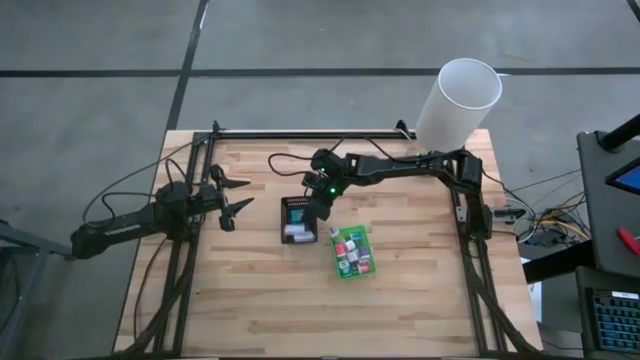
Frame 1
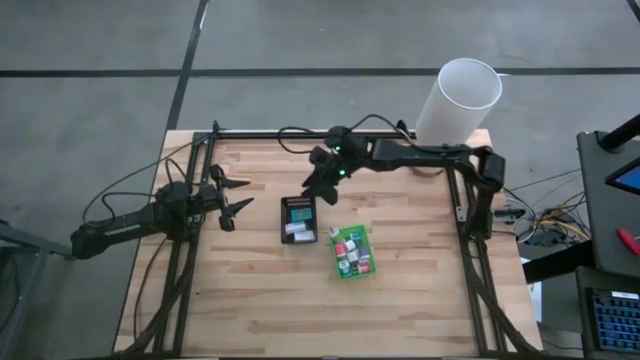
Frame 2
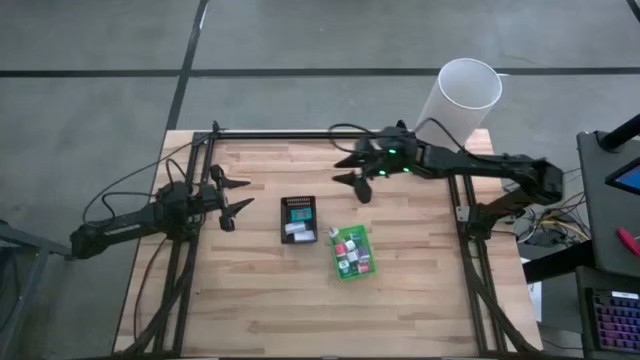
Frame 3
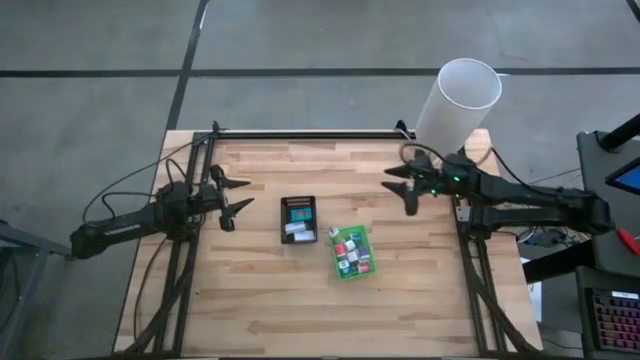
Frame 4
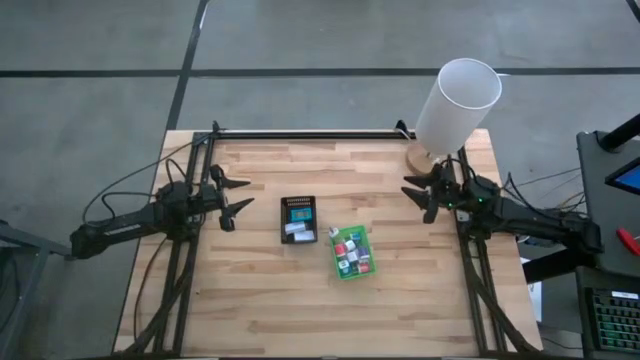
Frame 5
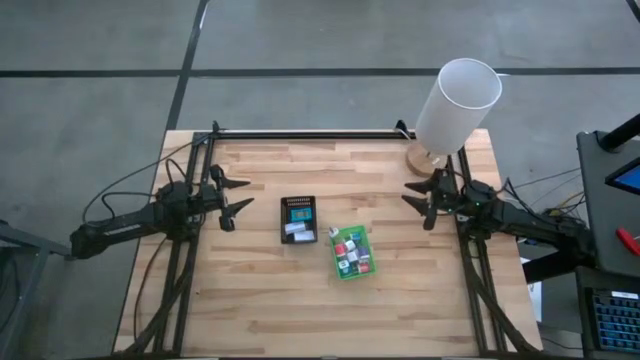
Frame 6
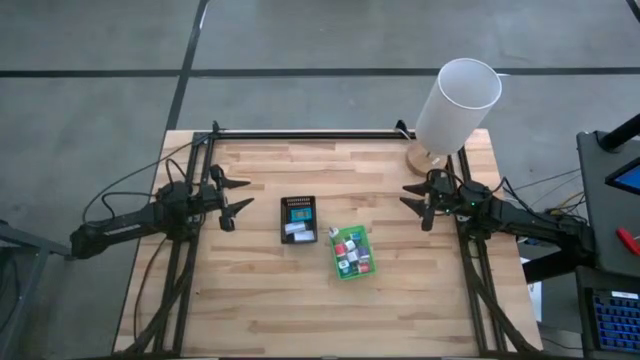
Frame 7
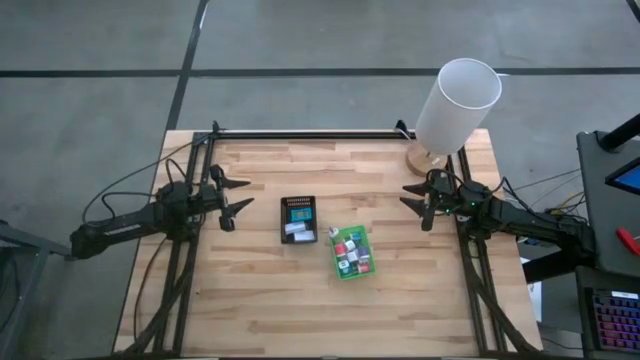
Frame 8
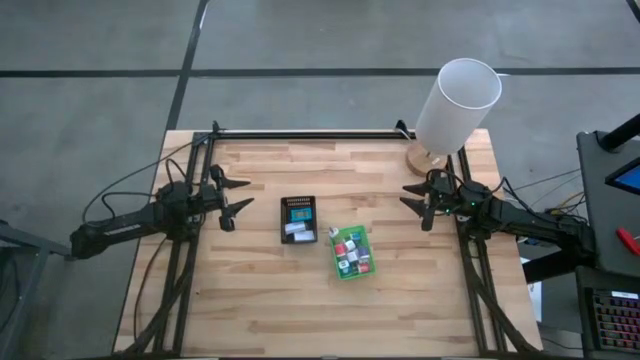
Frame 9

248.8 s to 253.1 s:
Task: Pick & Place Office items
Return to Home Position

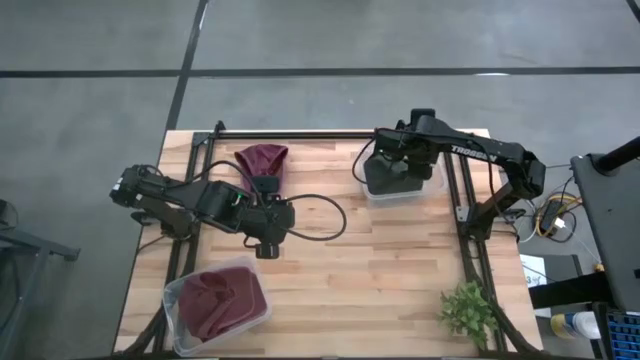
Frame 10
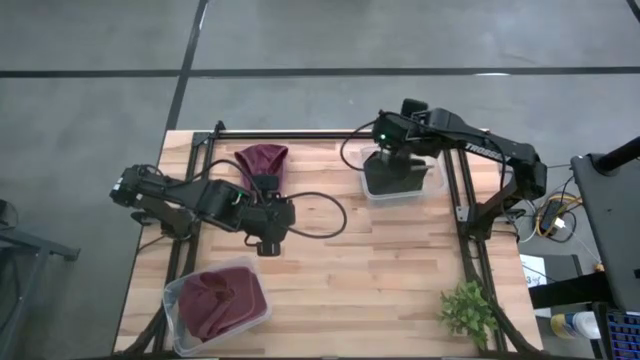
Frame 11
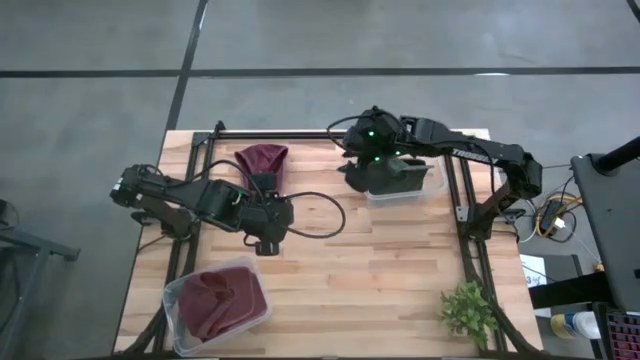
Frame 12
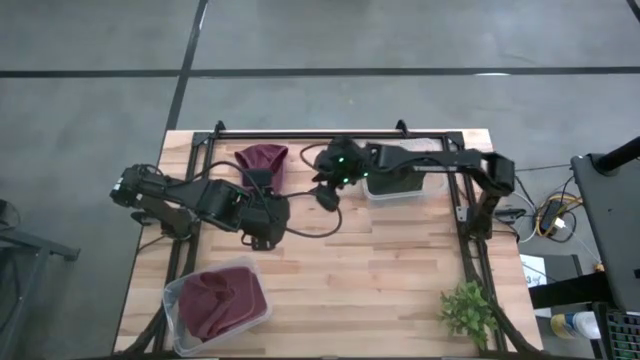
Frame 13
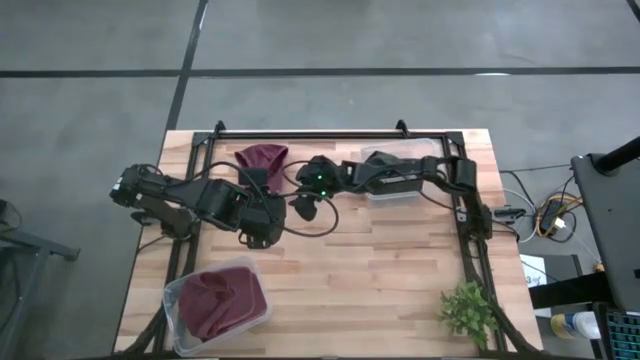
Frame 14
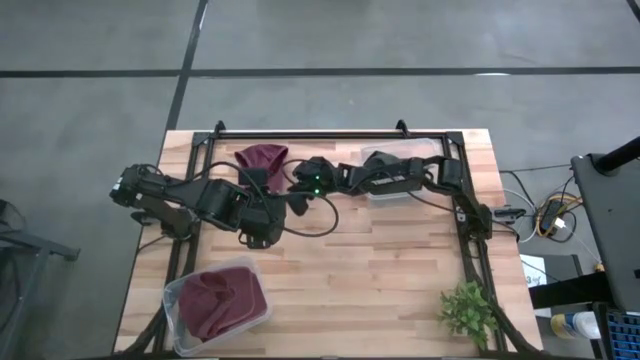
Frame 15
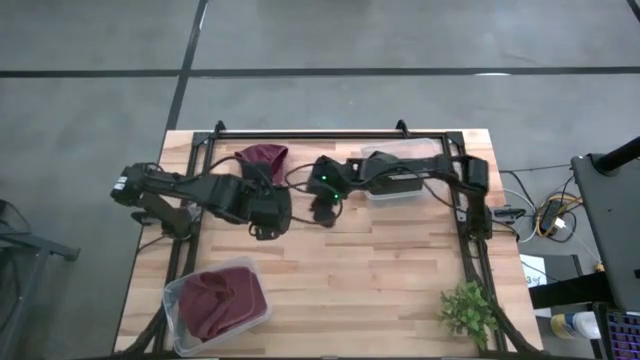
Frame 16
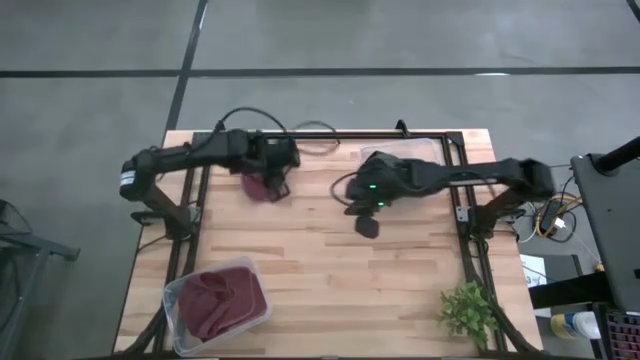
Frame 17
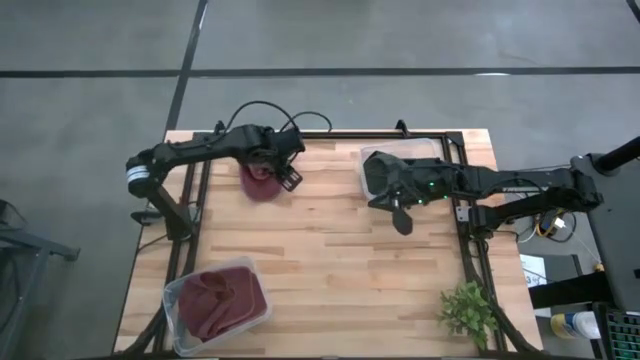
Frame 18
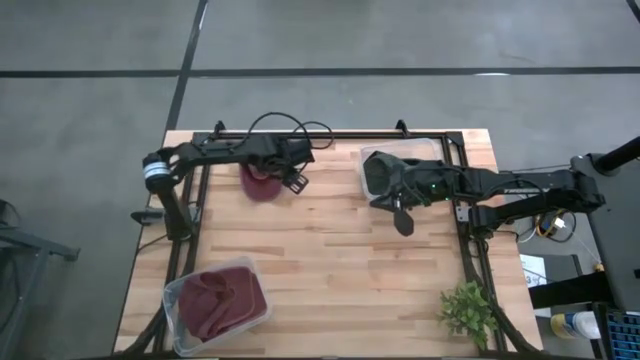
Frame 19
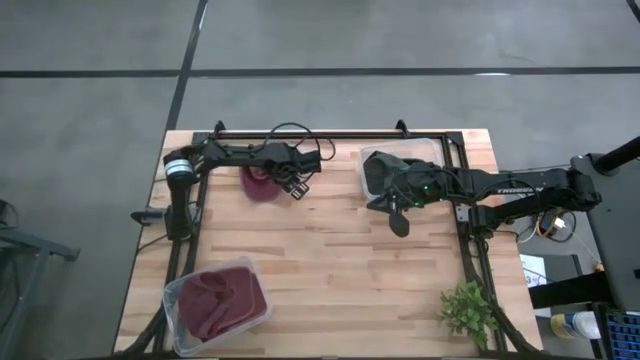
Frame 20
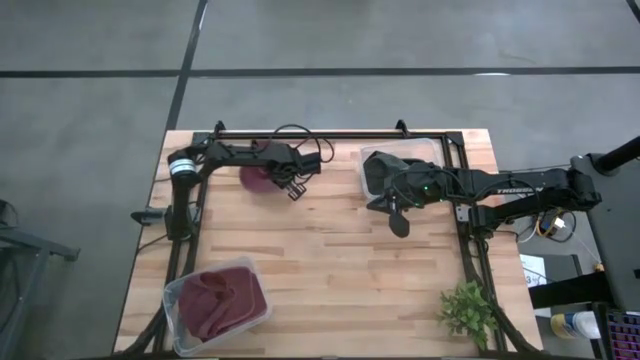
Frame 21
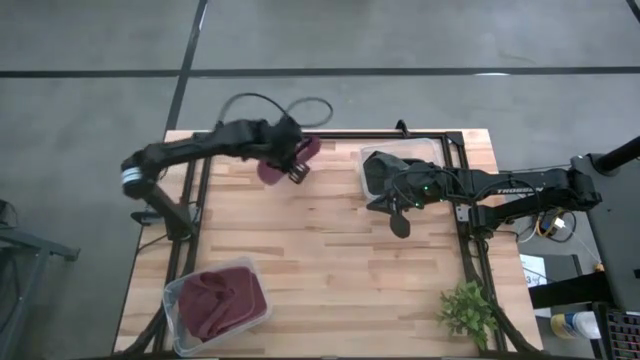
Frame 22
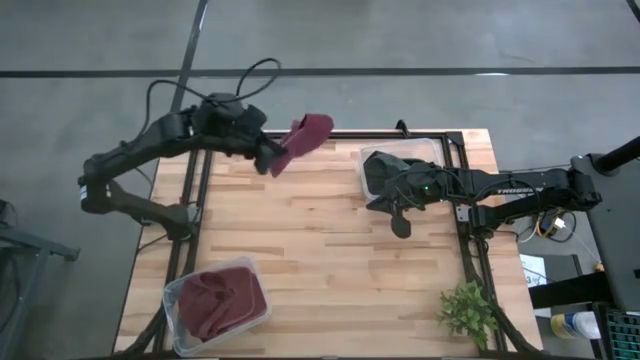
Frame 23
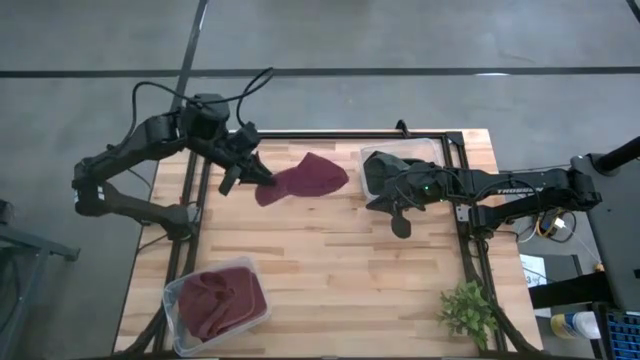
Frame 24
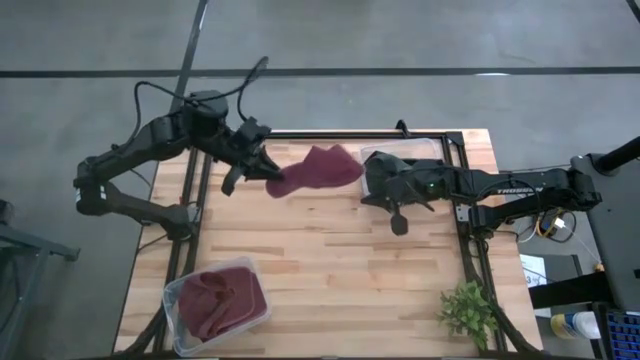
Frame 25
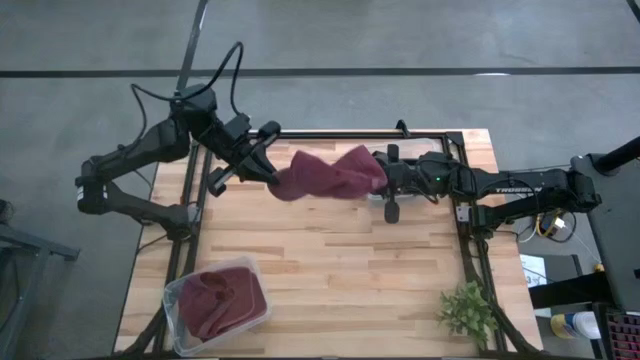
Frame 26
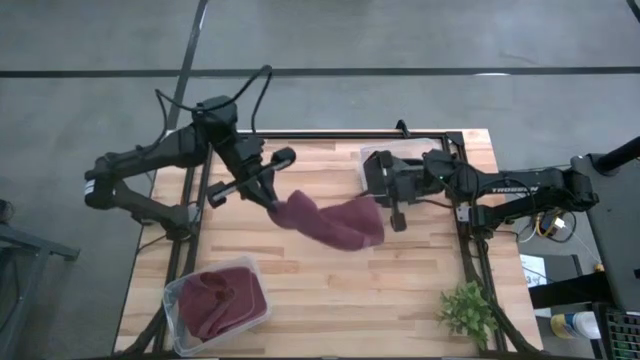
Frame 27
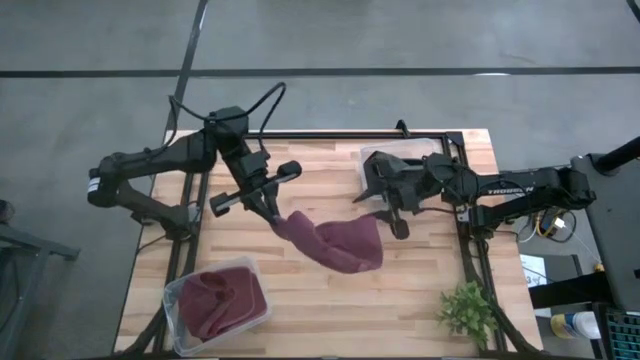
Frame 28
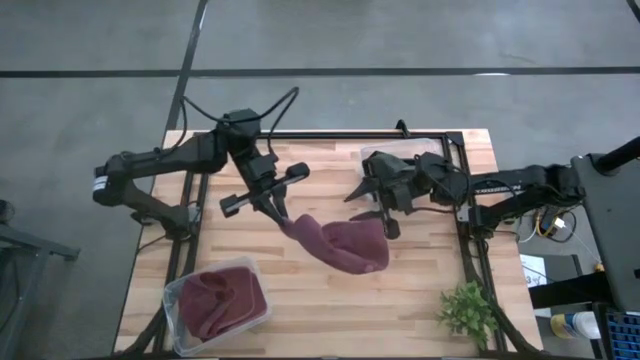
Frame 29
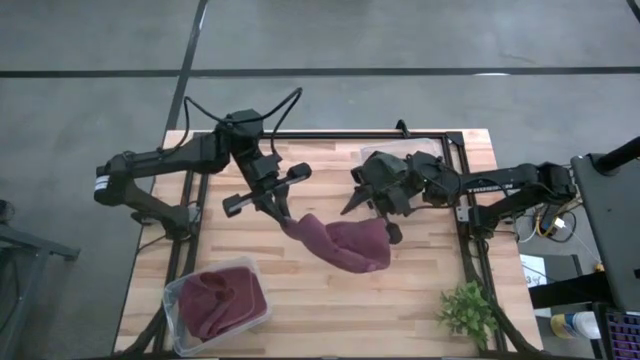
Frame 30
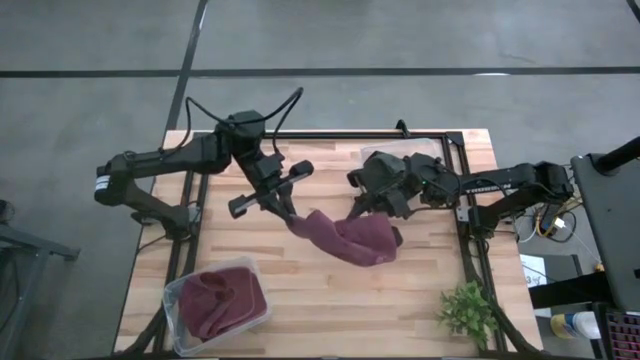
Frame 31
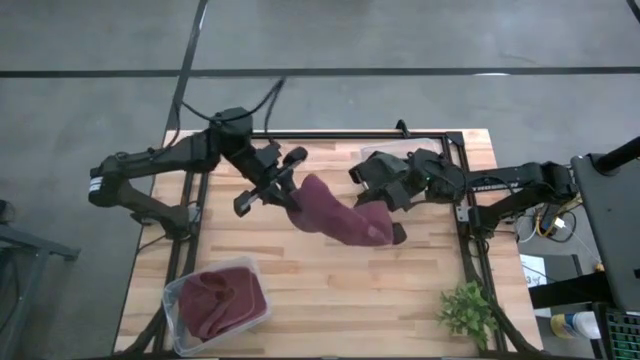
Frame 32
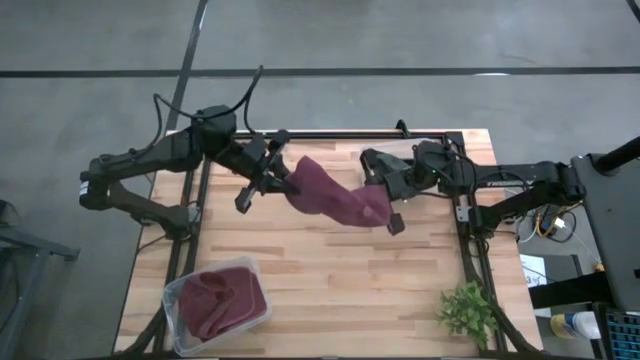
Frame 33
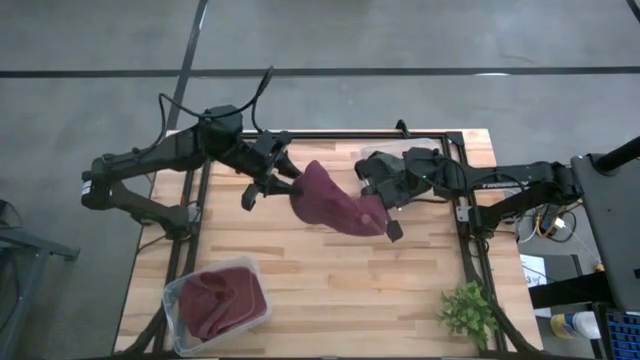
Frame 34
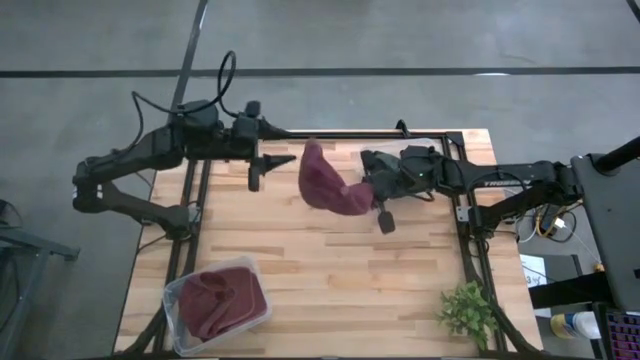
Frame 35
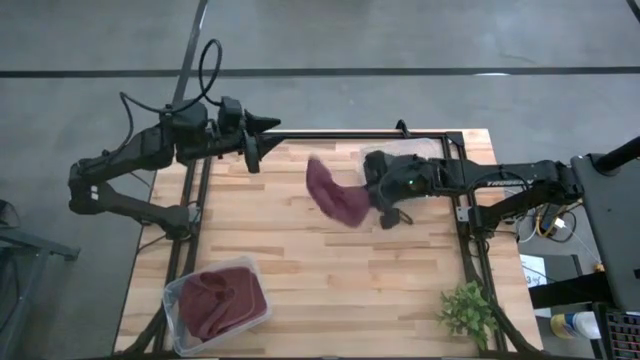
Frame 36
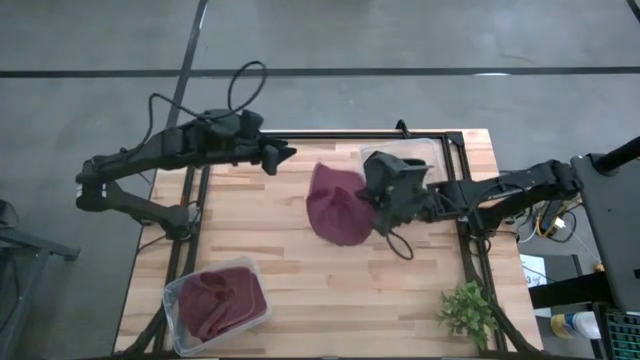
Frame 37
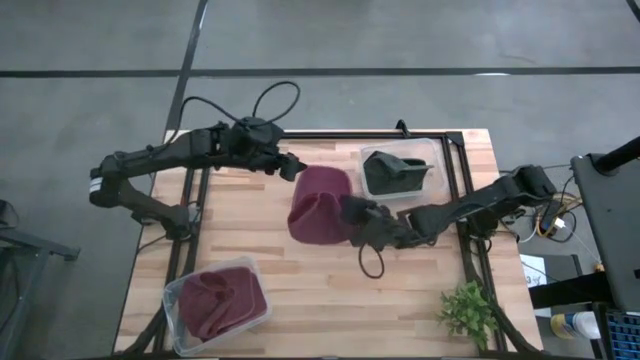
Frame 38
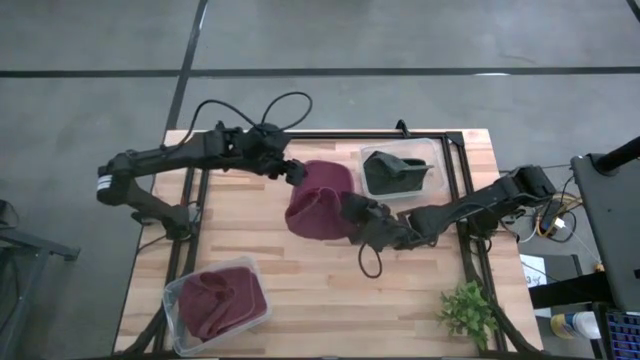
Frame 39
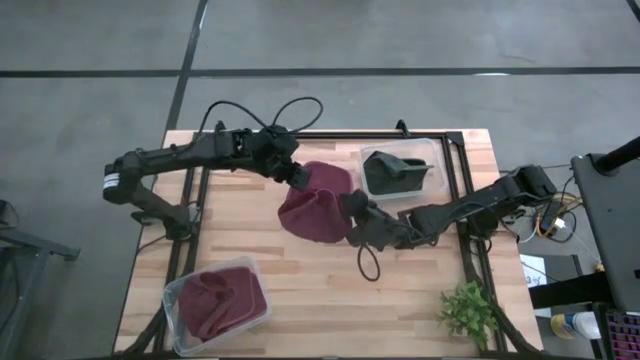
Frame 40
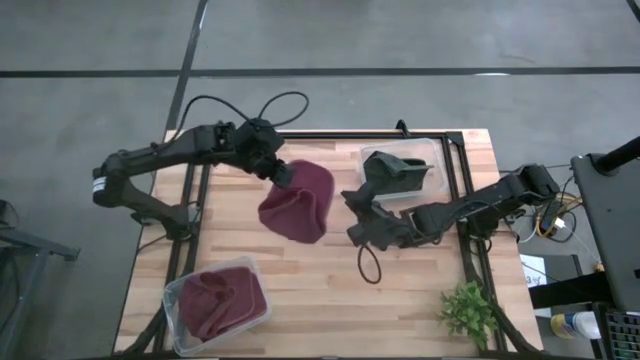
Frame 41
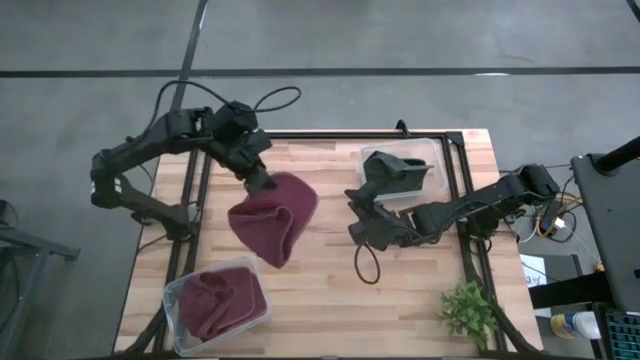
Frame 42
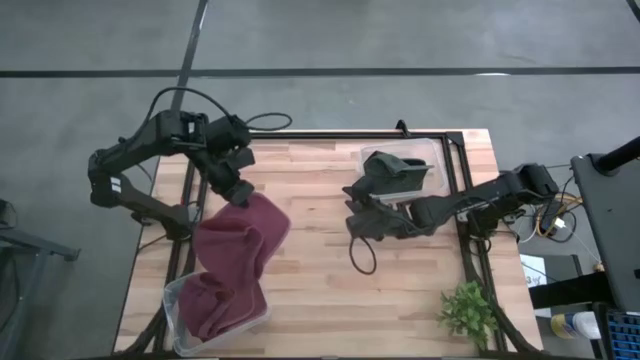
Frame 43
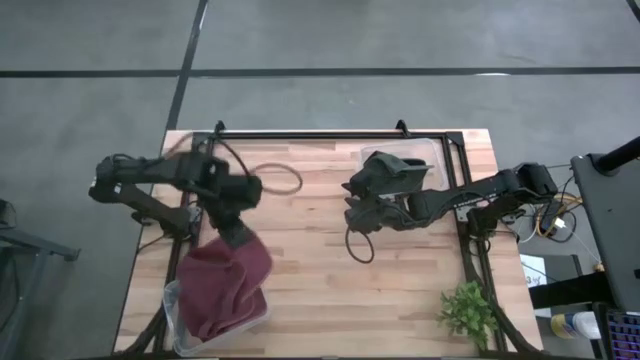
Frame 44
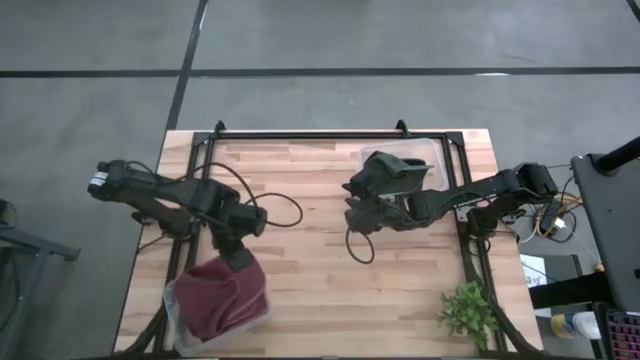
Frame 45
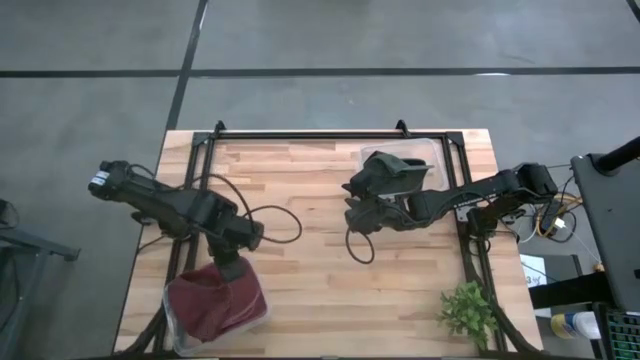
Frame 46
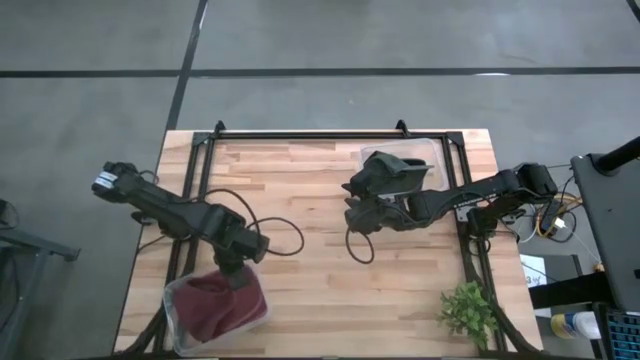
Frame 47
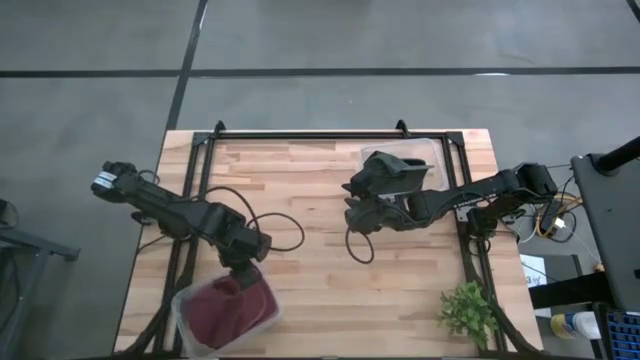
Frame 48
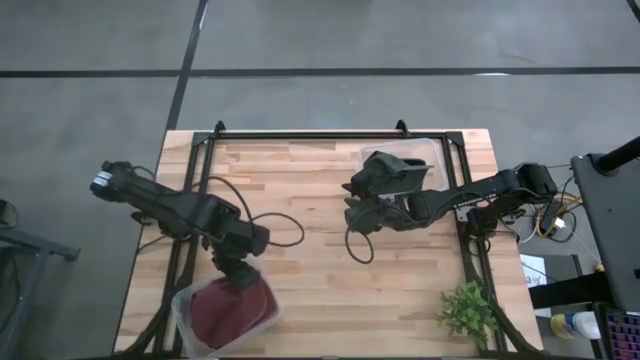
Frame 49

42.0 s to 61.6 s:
Task: Pick & Place hat
Put the dark red cap into the bottom transparent bin
